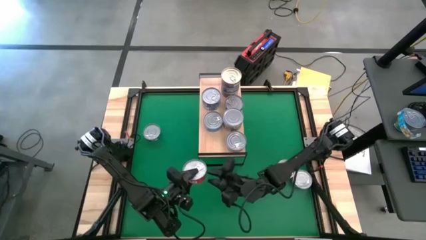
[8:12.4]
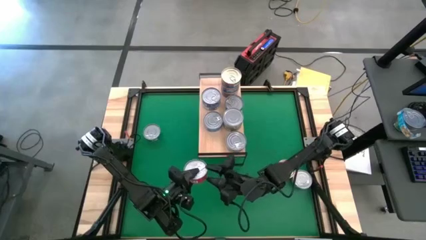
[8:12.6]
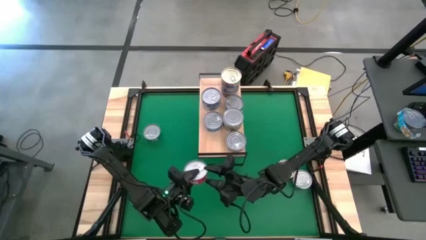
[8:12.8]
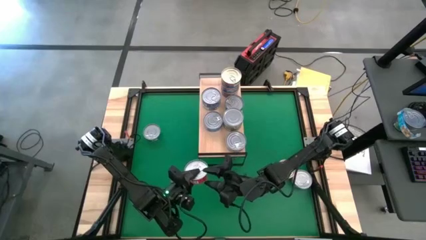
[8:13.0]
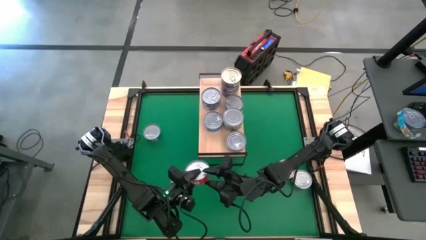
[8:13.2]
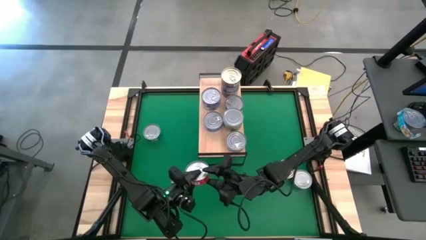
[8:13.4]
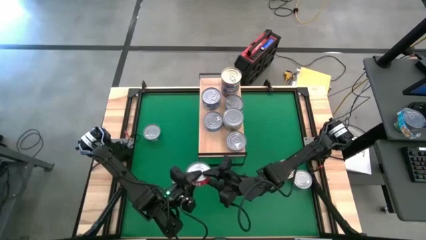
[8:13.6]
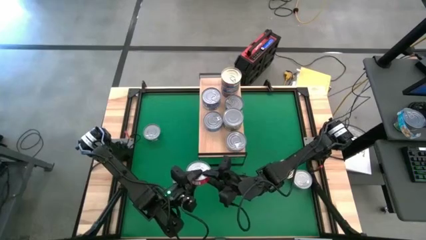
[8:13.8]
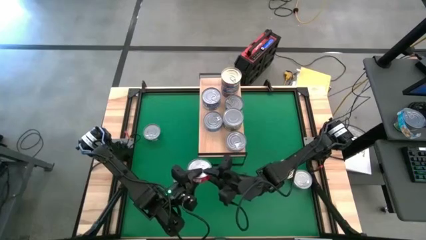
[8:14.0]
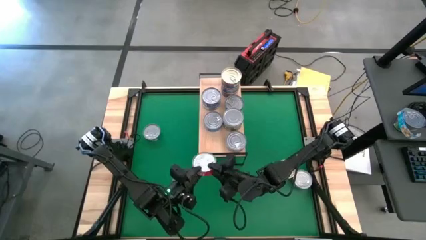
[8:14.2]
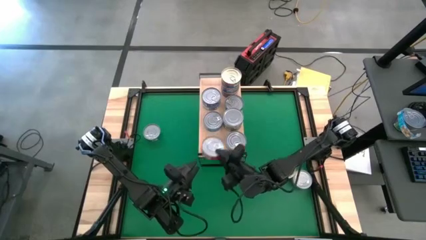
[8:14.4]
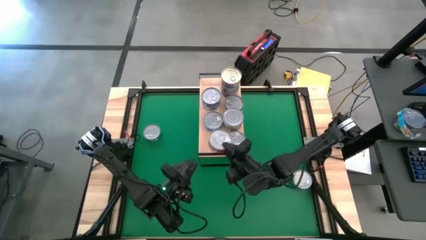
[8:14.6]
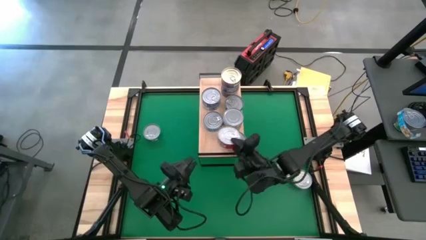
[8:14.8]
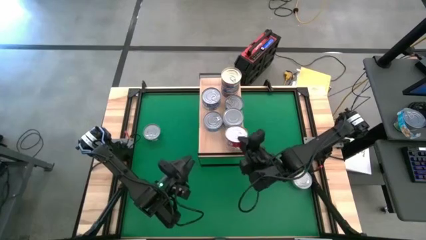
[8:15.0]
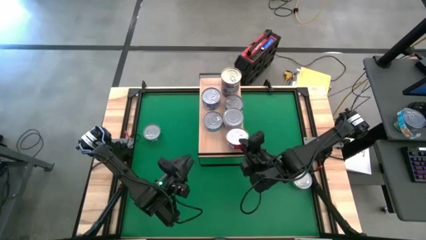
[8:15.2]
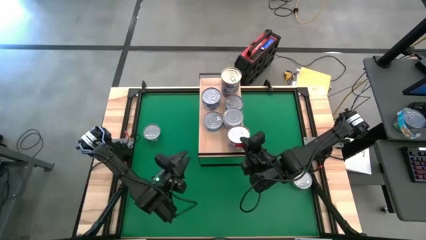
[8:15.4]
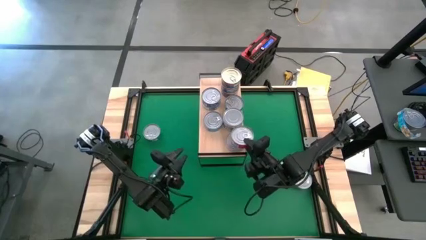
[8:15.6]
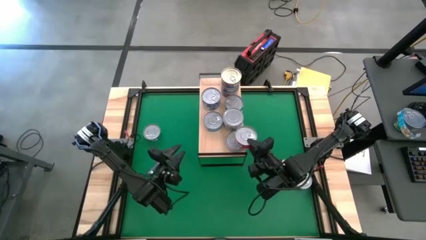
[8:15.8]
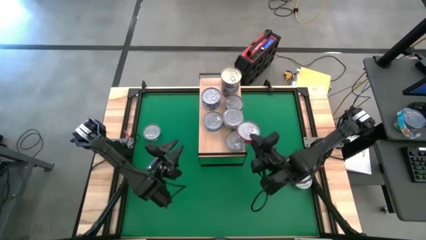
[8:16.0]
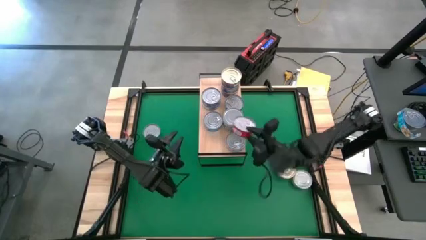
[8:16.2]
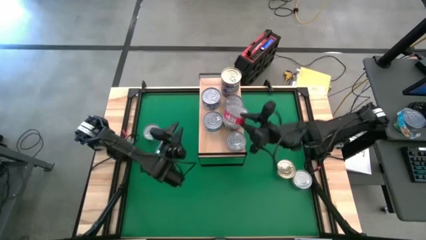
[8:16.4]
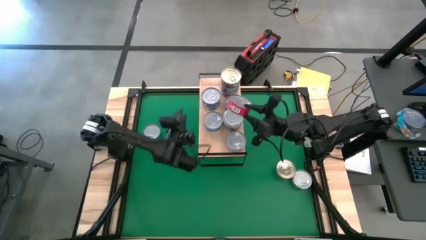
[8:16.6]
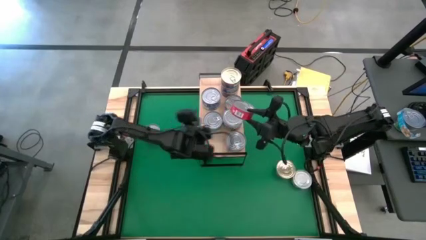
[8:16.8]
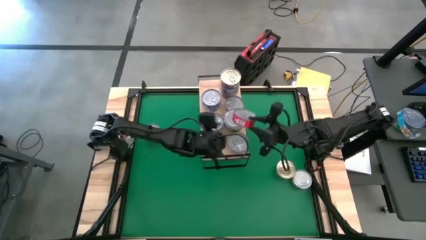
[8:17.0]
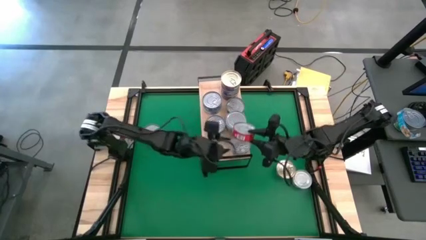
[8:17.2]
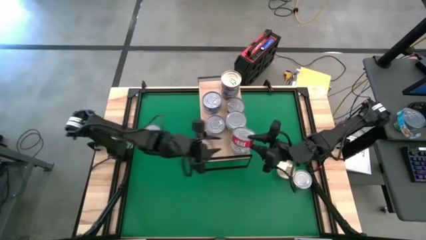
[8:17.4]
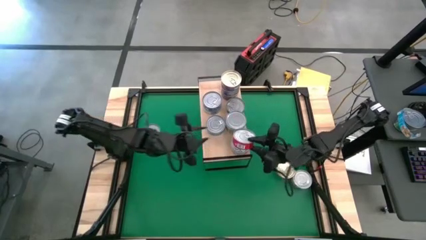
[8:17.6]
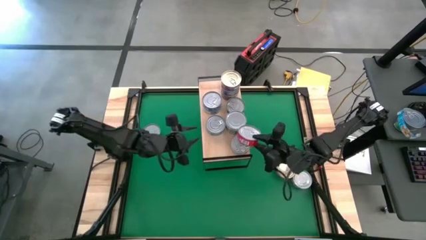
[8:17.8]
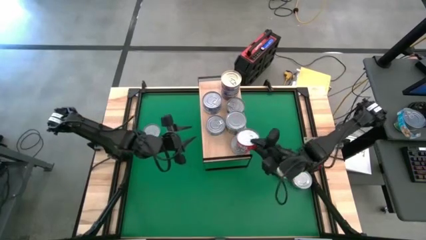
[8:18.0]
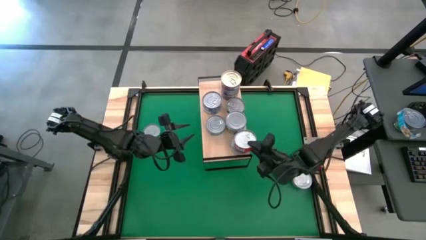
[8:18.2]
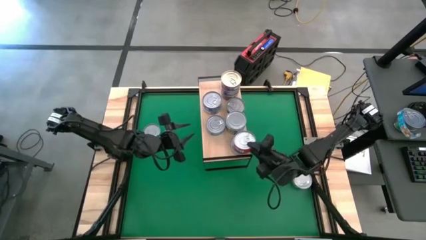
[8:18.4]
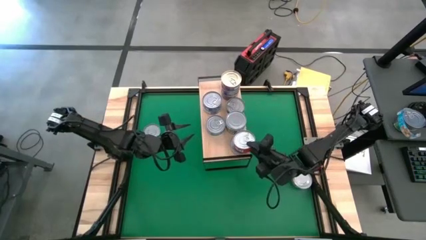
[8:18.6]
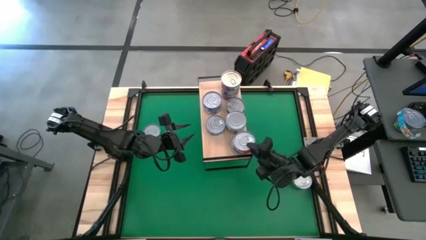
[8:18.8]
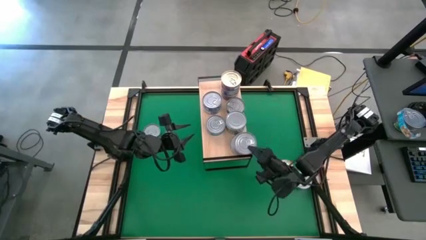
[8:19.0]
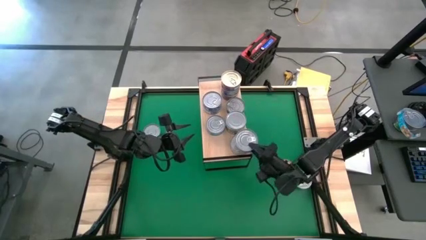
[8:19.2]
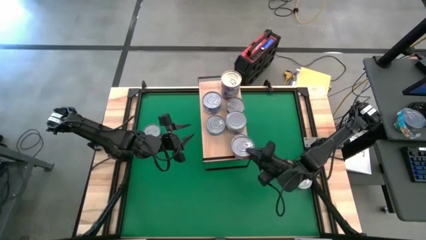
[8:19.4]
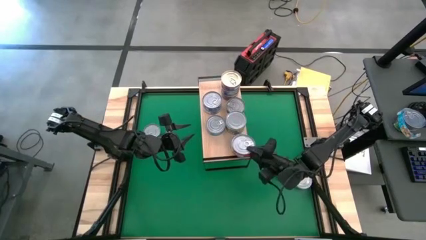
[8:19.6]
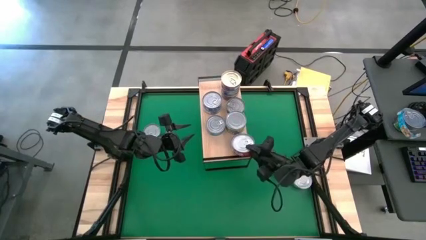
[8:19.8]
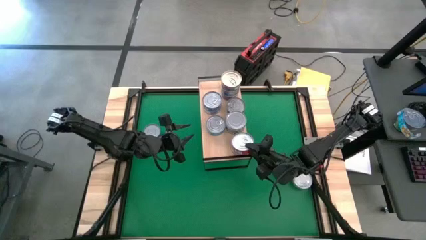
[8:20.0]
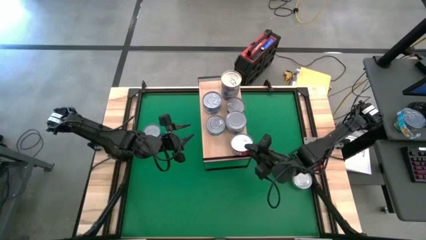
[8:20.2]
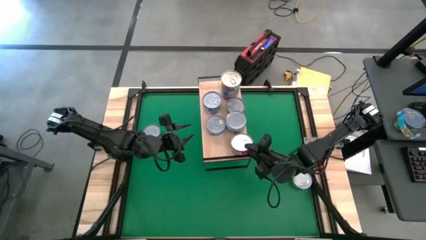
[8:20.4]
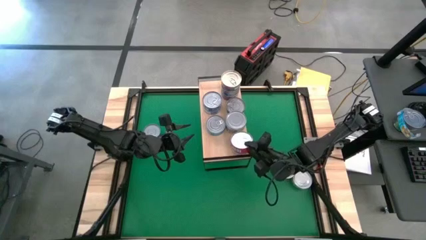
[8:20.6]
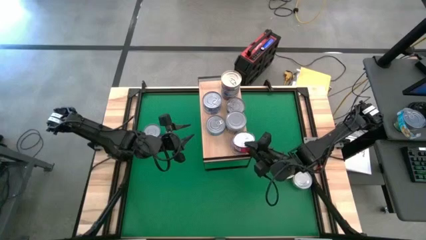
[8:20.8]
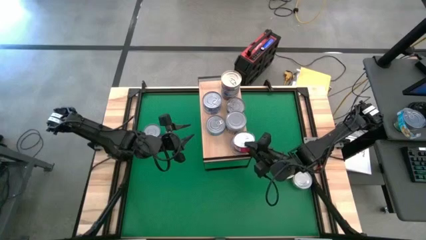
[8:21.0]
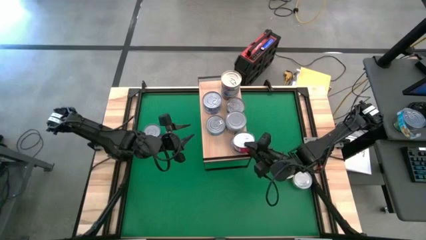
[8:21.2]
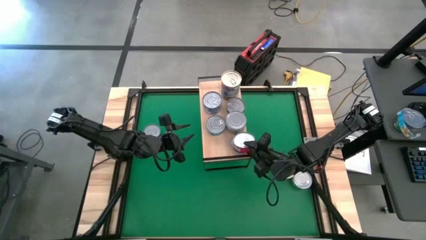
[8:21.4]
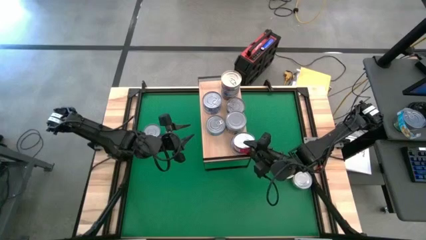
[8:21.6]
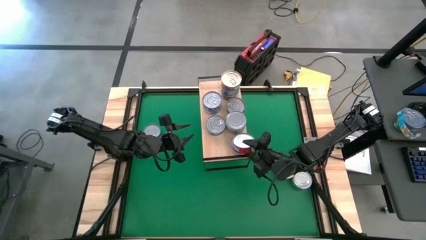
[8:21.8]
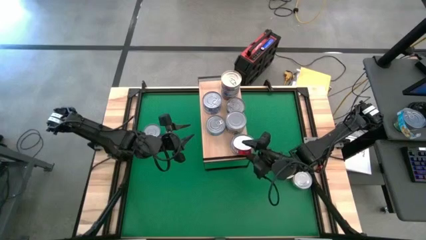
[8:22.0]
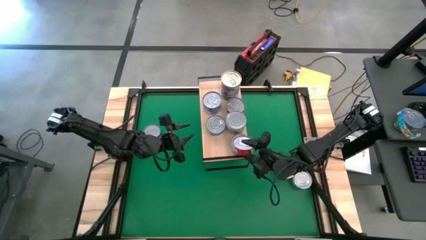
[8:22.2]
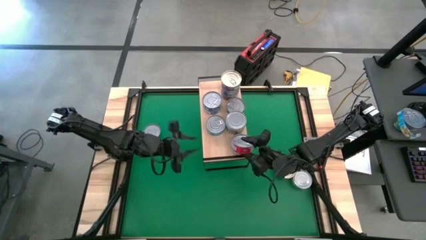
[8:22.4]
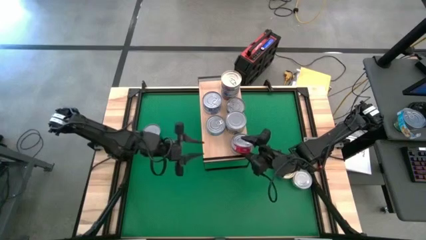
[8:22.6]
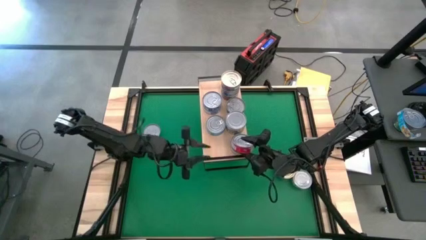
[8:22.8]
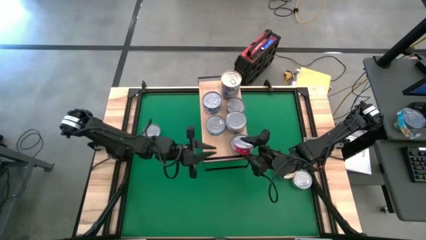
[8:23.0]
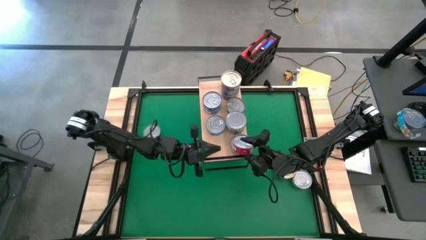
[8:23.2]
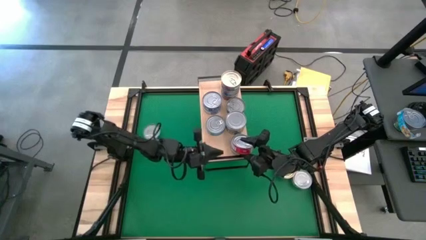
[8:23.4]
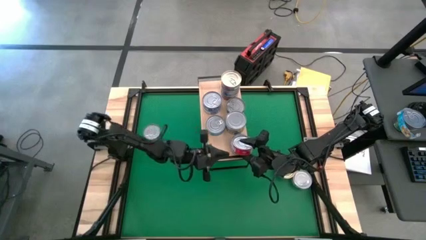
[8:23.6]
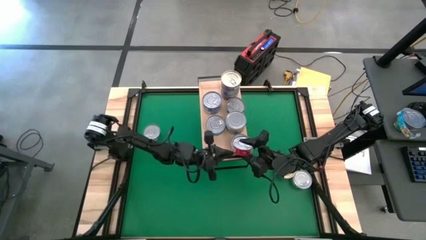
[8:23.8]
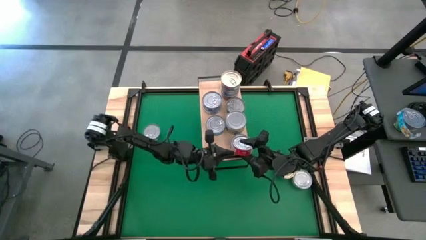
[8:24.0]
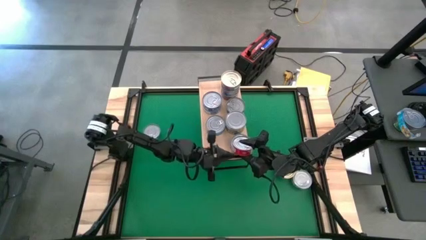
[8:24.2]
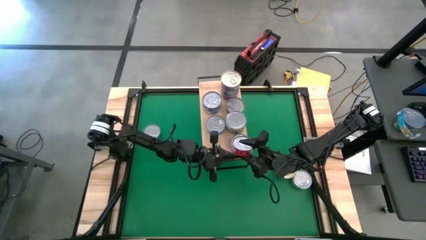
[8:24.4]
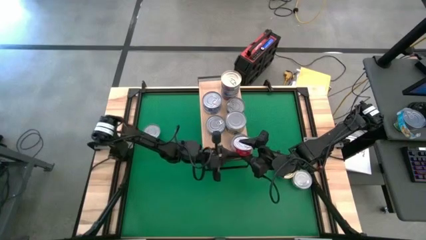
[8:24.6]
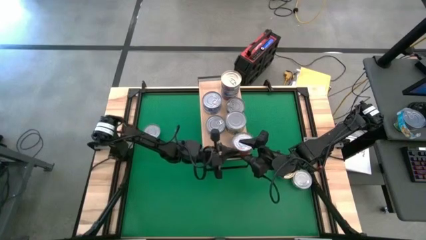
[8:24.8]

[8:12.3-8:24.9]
Task: Stack canned seafood by type on shelf
Stack the red tuna can on top of the red tuna can on the shelf
